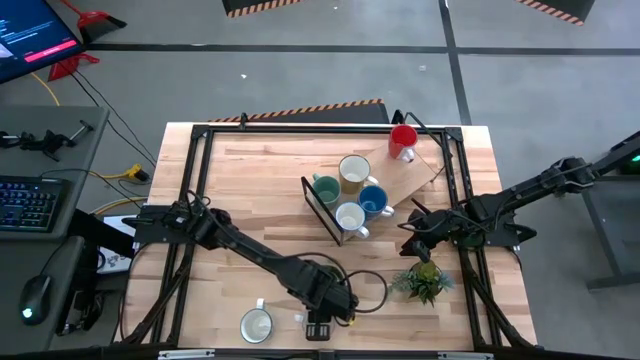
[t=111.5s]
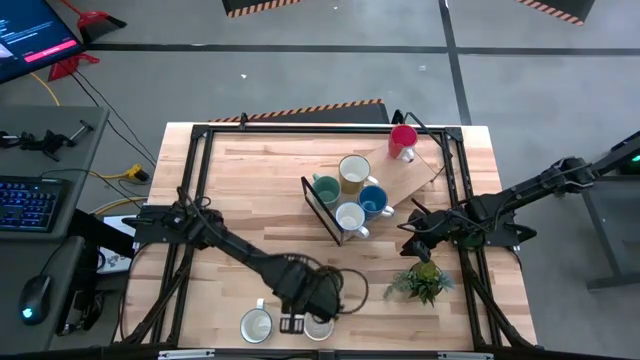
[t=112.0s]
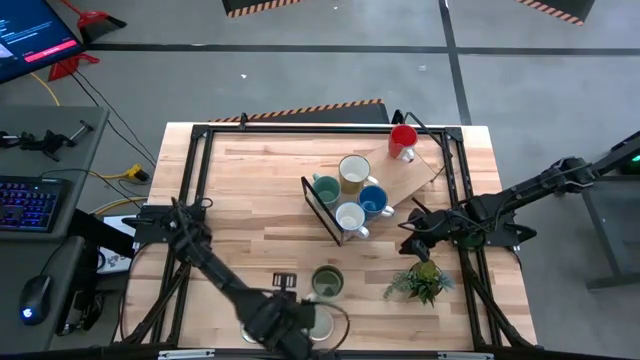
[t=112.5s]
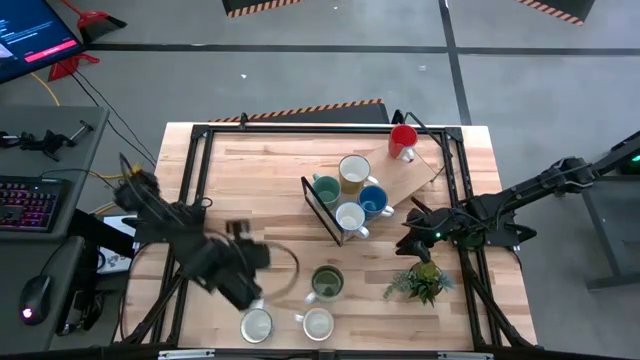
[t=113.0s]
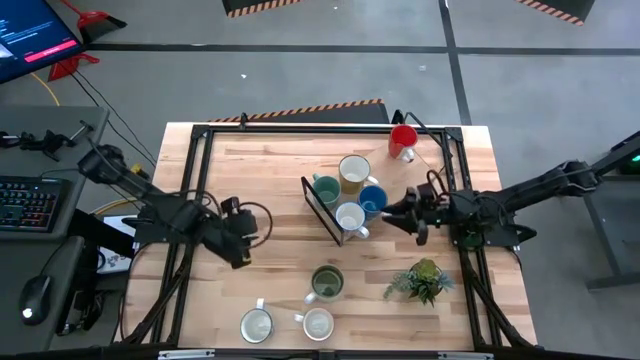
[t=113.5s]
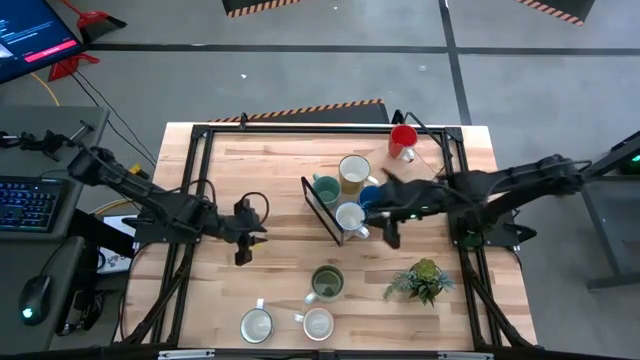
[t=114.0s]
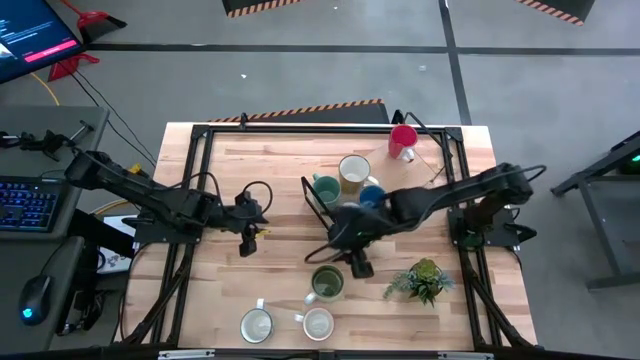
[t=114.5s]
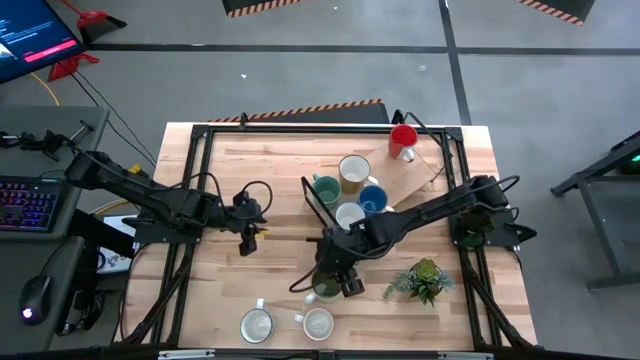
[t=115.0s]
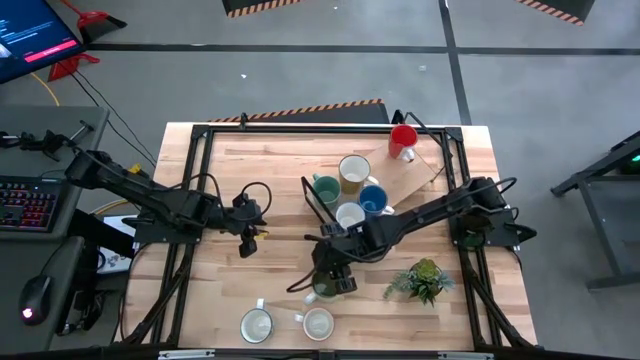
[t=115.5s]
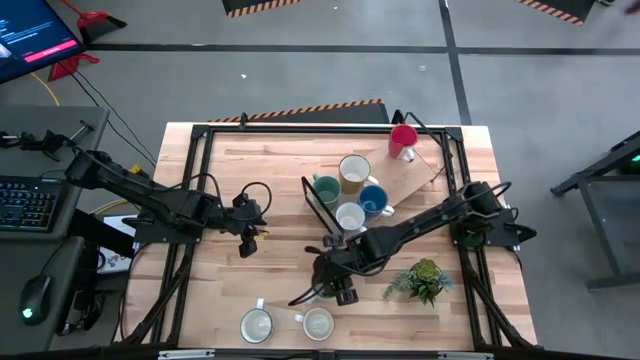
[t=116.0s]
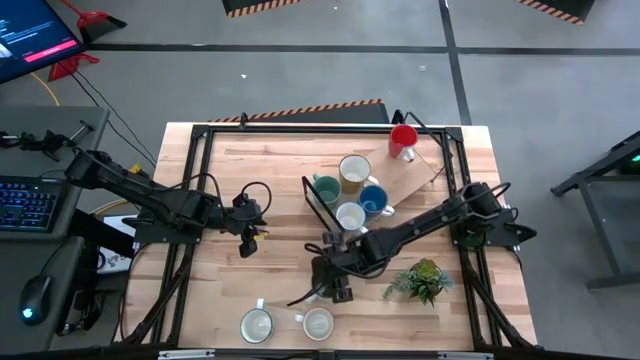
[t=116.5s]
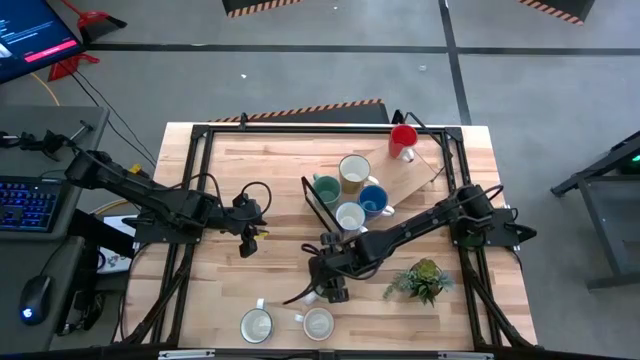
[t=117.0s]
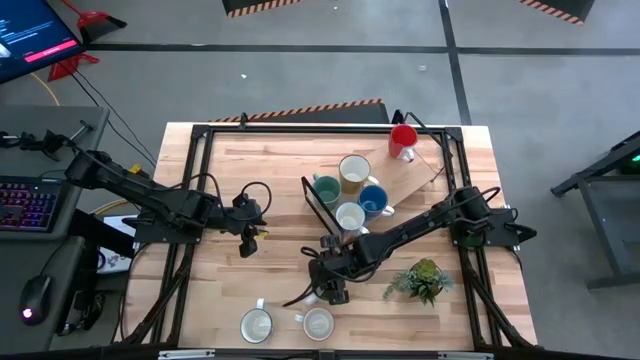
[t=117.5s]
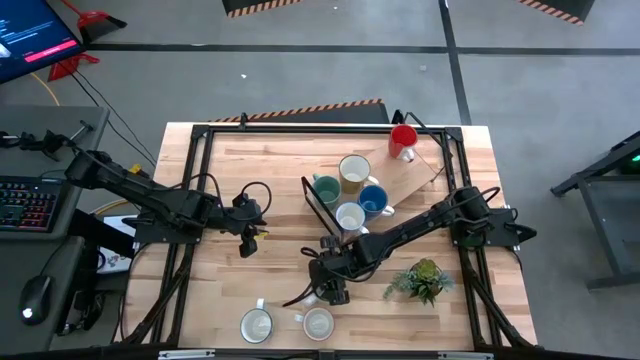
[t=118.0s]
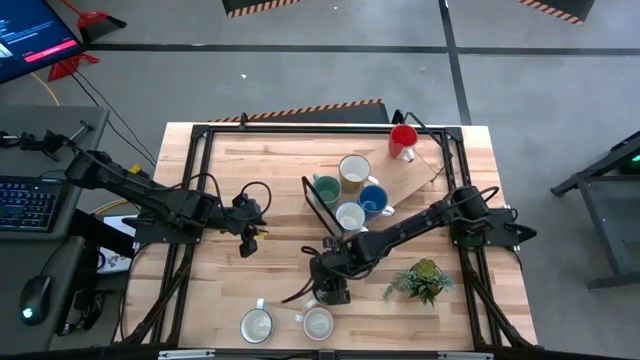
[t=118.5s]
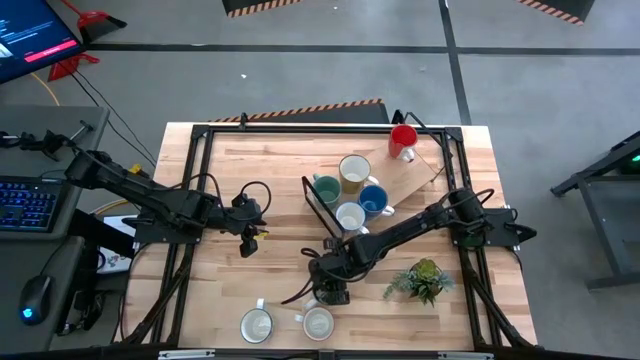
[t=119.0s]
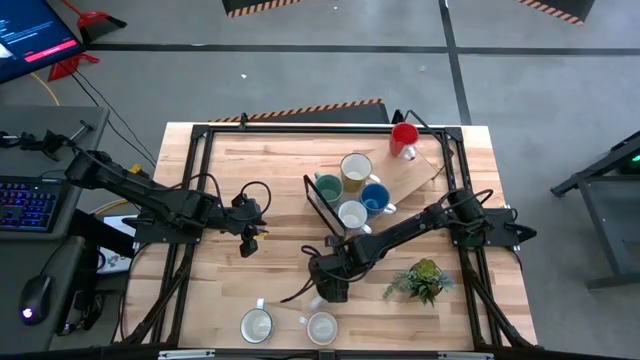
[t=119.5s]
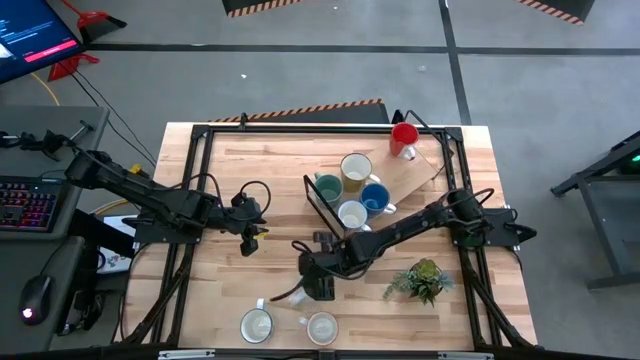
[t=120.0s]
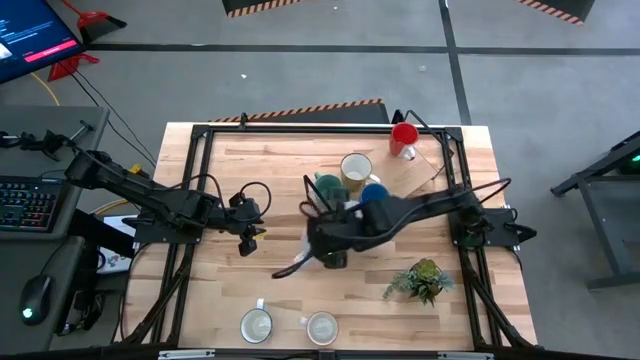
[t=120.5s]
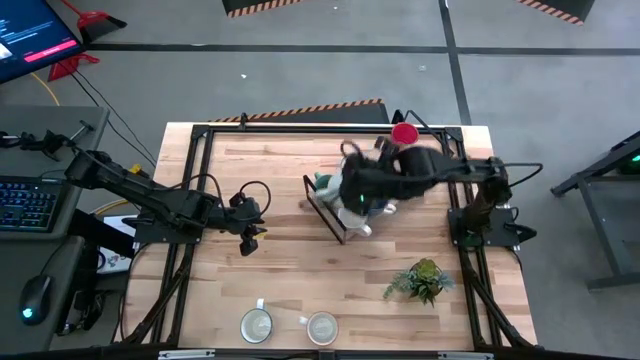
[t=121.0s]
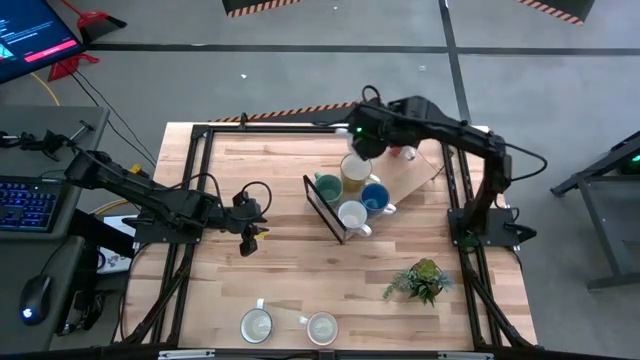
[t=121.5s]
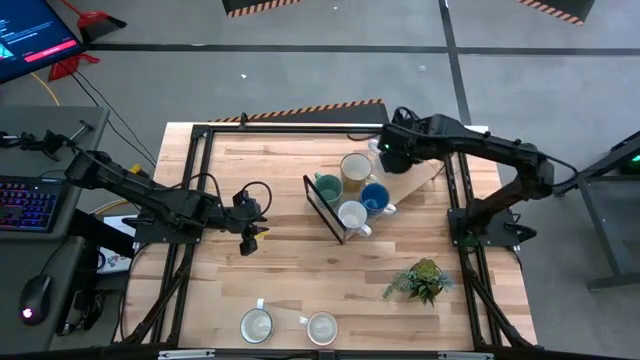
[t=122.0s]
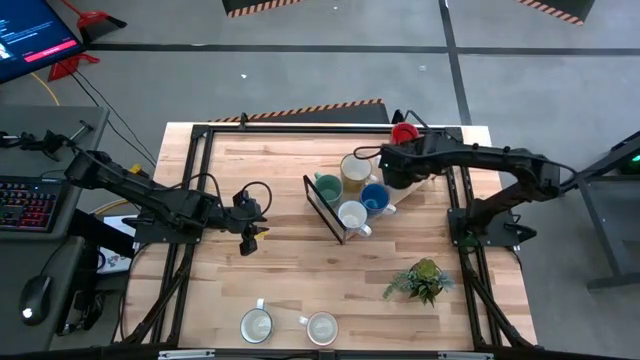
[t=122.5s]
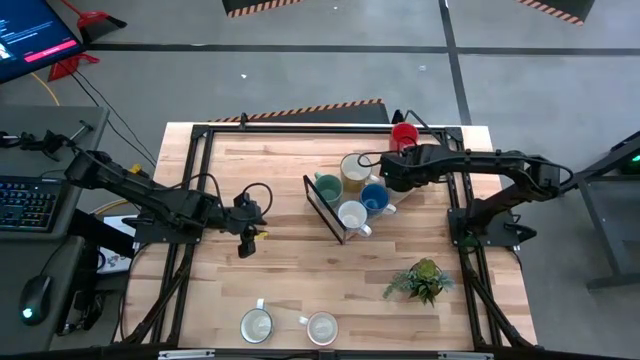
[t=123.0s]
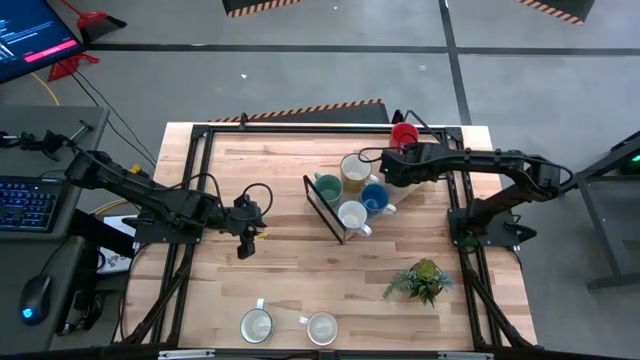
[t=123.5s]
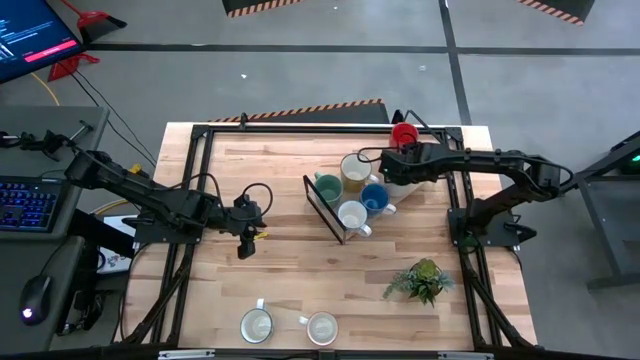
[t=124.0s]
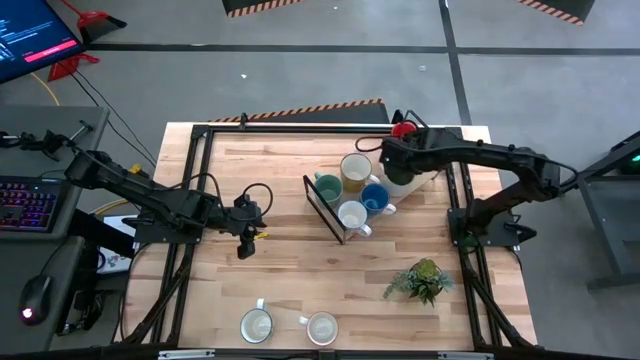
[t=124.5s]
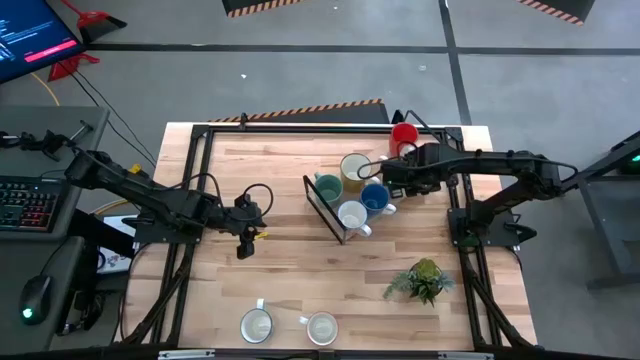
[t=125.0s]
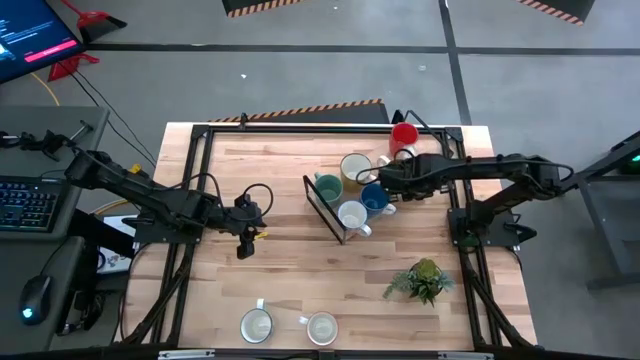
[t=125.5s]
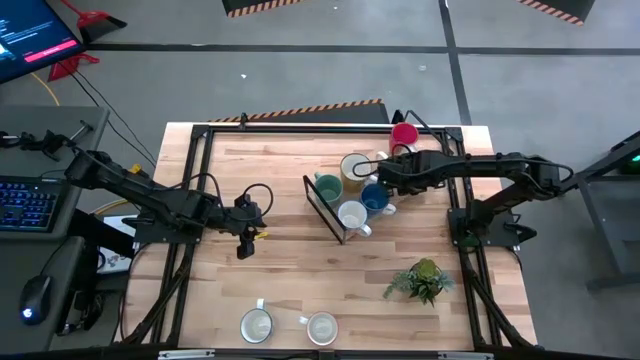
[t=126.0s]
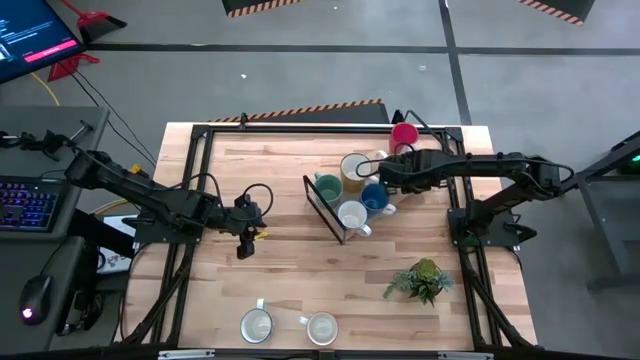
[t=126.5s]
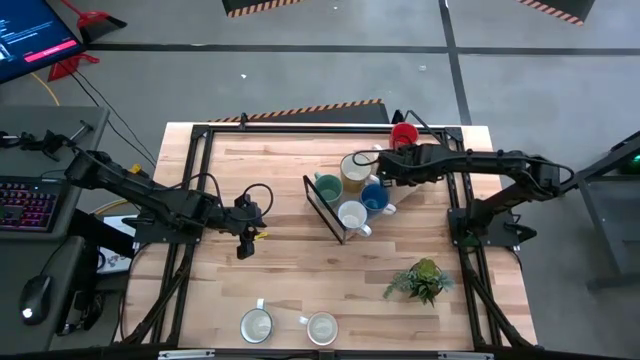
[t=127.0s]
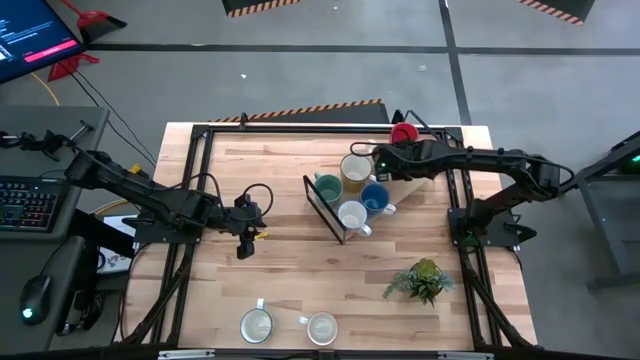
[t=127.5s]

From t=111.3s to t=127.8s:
Task: Place coffee mugs
Put the white mug on the shelf

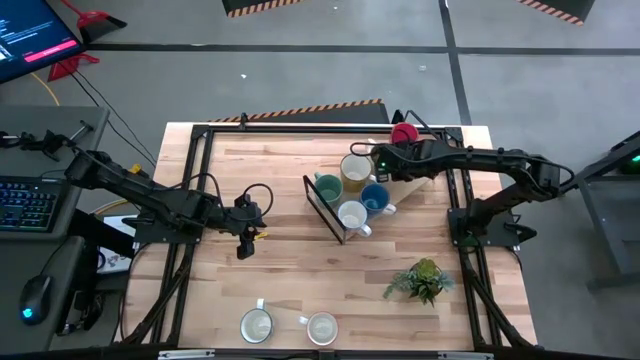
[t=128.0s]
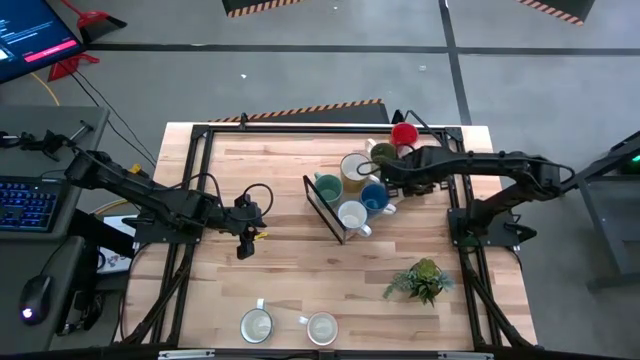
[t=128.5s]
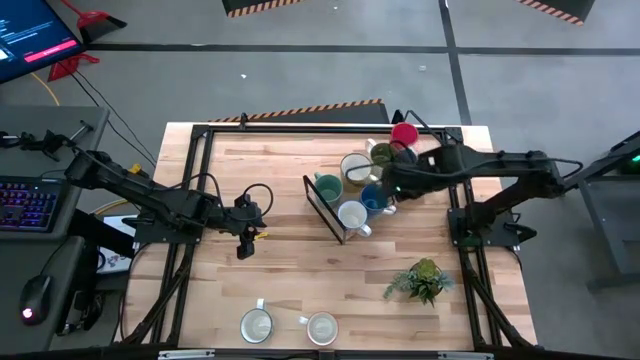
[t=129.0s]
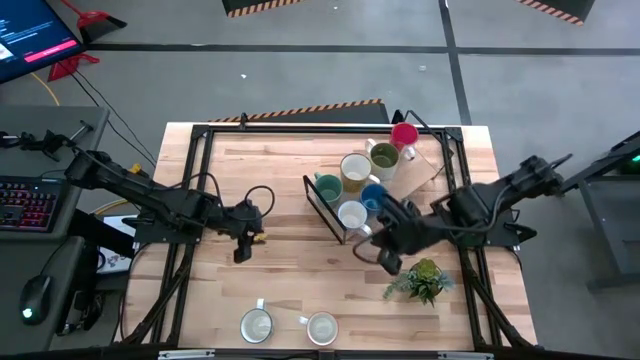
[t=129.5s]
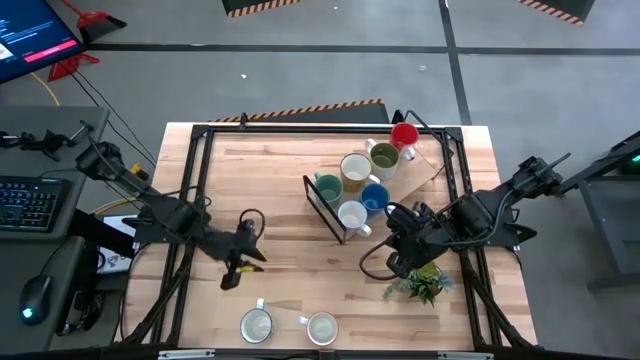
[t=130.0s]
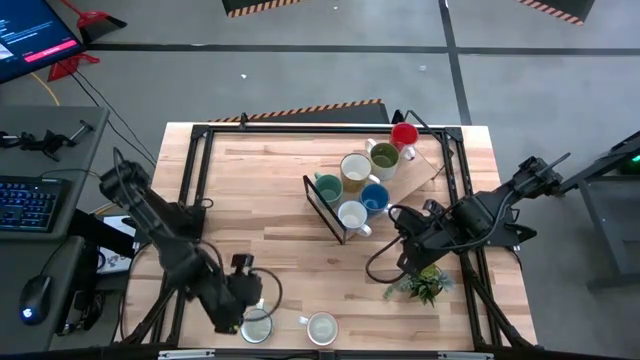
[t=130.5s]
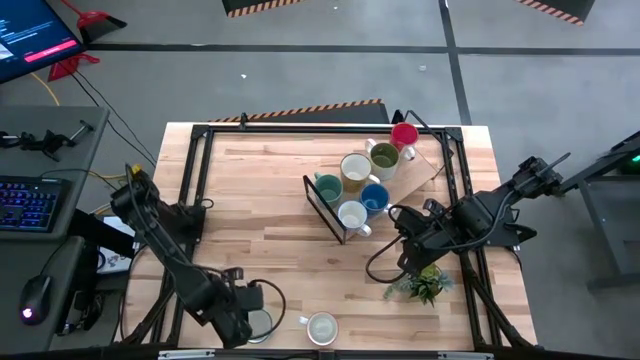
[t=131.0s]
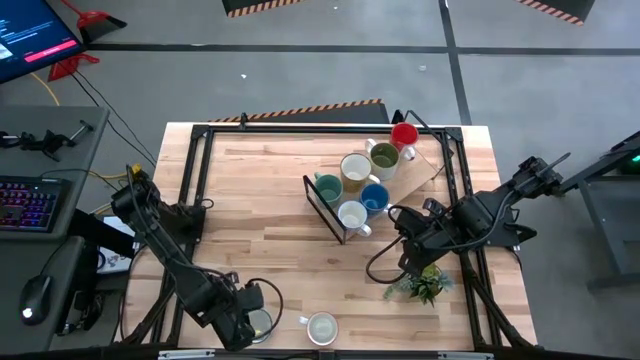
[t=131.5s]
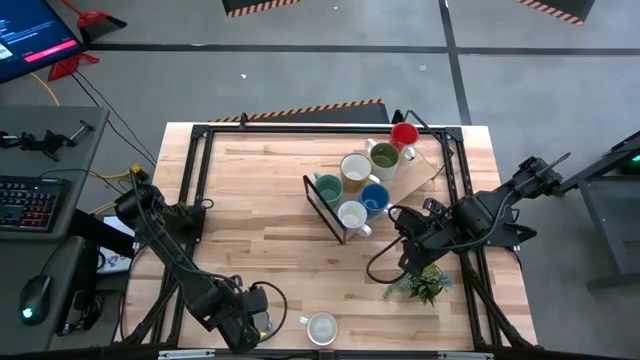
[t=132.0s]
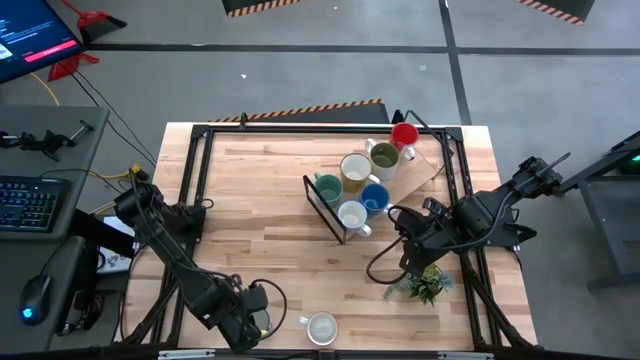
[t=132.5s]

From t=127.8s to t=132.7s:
Put the blue patterned mug on the shelf

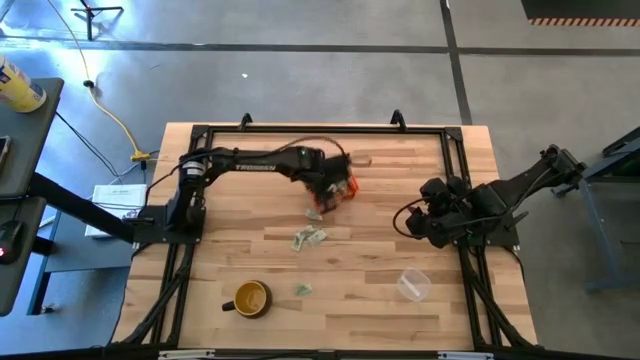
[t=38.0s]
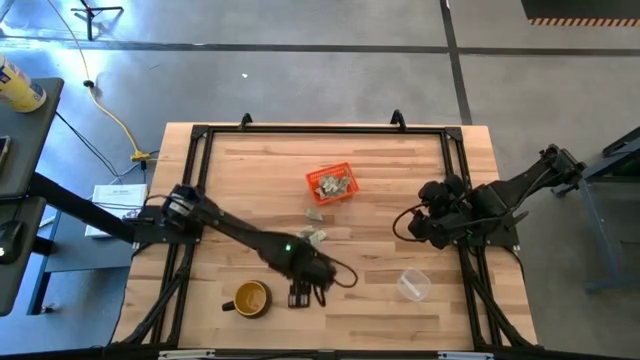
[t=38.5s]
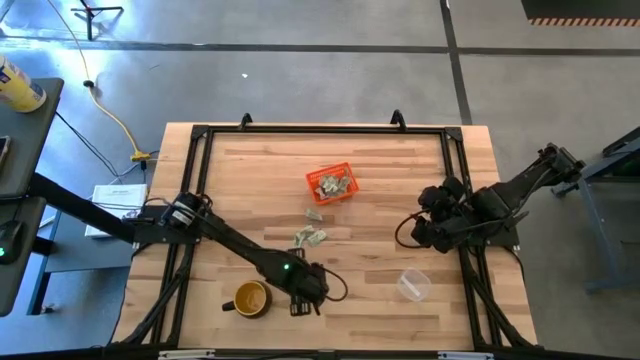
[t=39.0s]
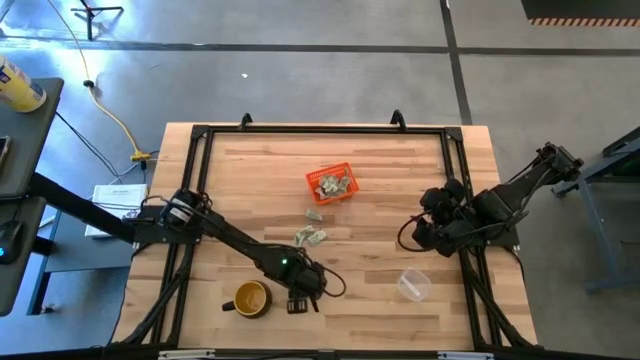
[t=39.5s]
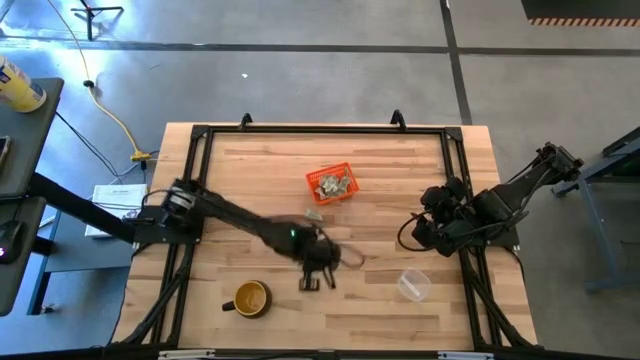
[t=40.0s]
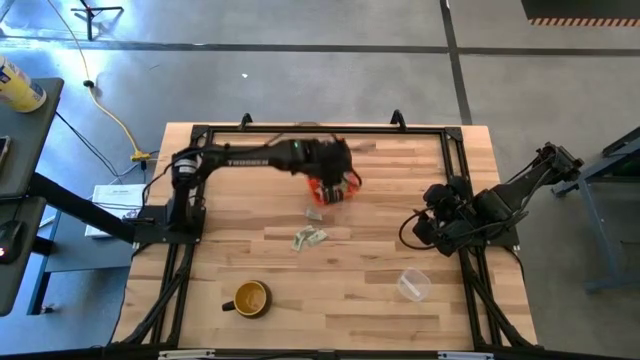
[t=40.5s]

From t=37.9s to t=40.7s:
Task: Pick and place items into bin
Put the white stevia packet into the orange bin
